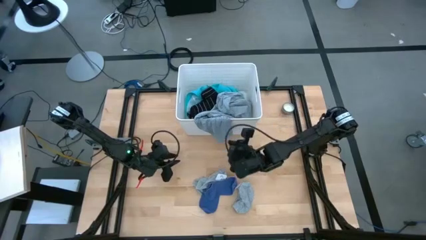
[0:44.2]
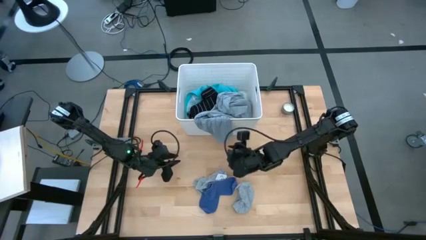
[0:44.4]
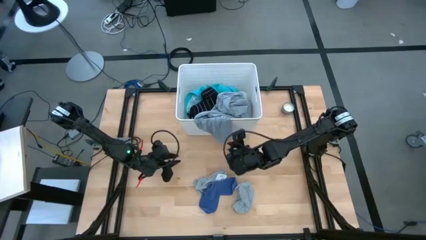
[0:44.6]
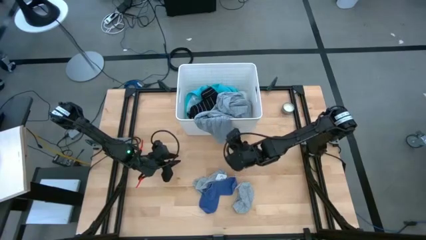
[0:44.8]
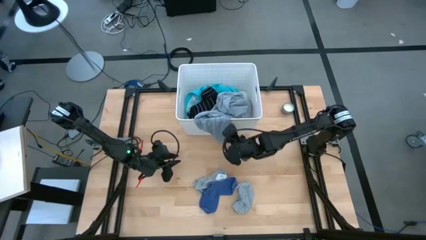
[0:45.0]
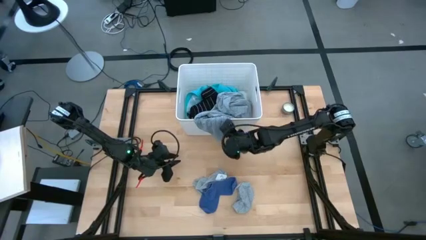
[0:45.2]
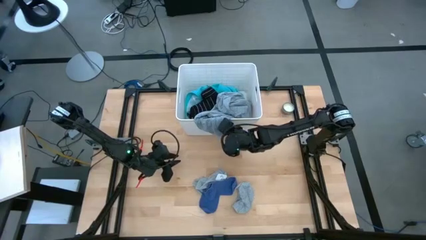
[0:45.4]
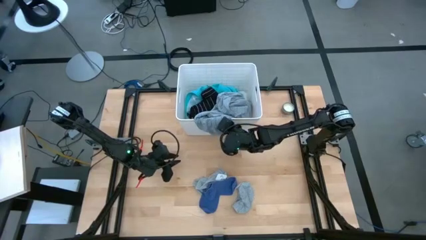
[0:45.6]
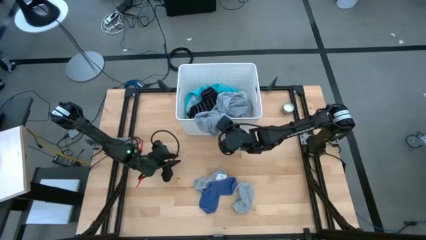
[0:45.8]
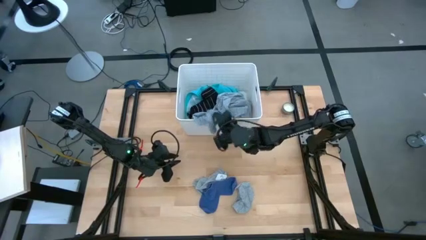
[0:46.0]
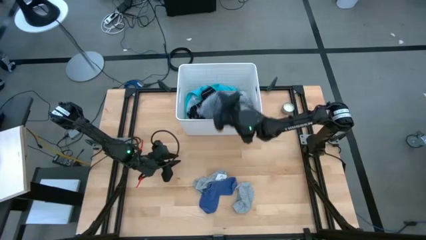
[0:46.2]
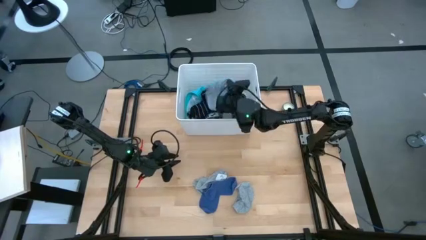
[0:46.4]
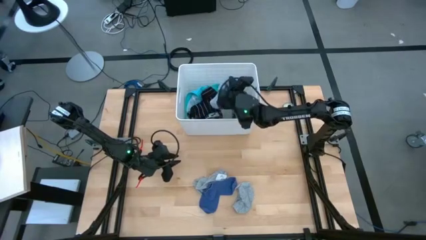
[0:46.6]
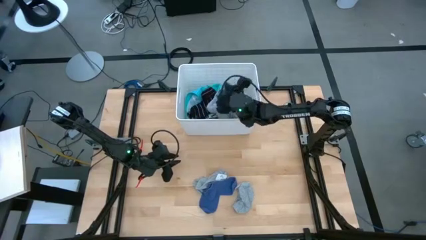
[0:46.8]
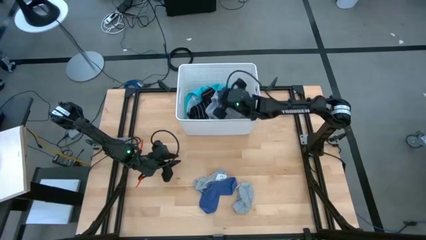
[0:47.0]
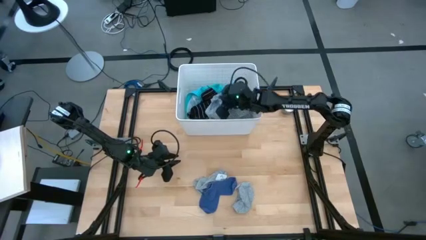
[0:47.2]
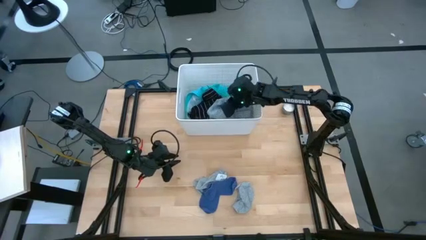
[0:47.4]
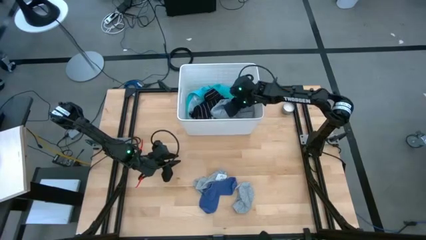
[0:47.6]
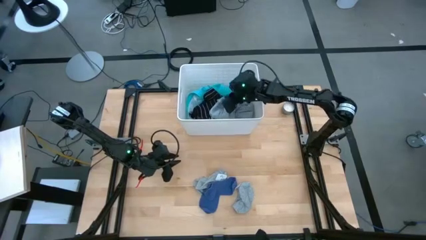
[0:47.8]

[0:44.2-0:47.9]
Task: Sort clothes
Put the gray shirt into the white laundry bin

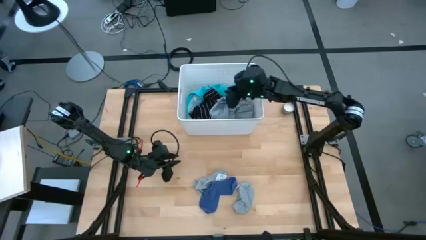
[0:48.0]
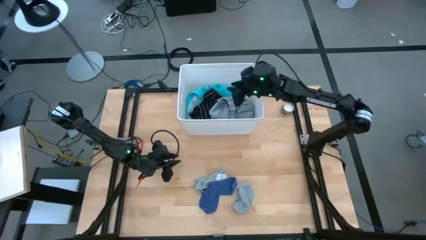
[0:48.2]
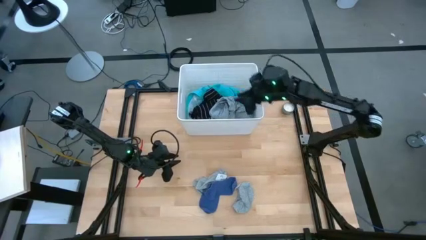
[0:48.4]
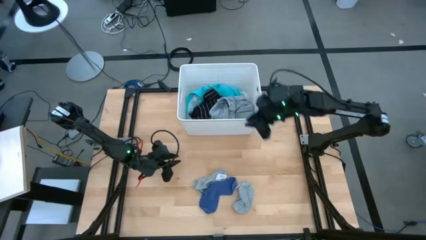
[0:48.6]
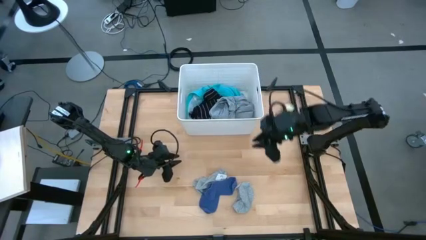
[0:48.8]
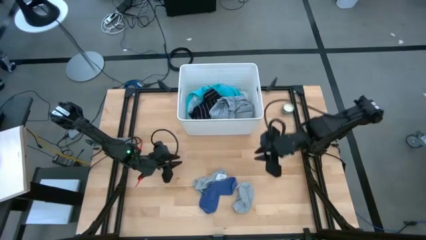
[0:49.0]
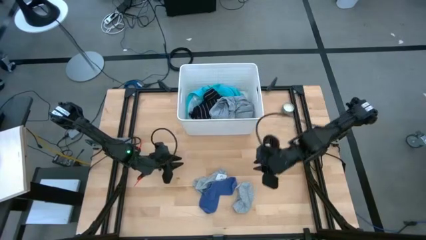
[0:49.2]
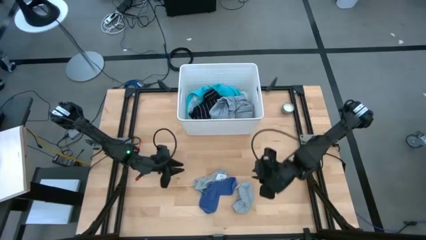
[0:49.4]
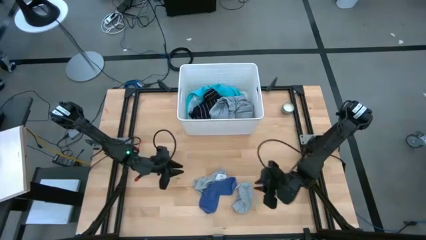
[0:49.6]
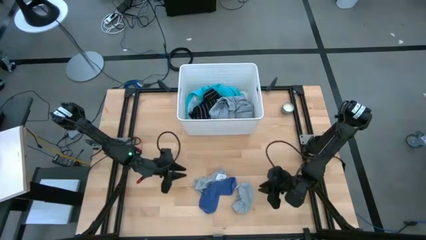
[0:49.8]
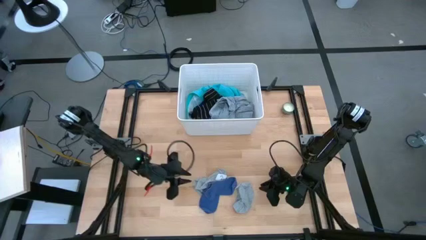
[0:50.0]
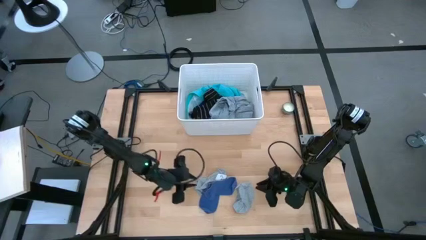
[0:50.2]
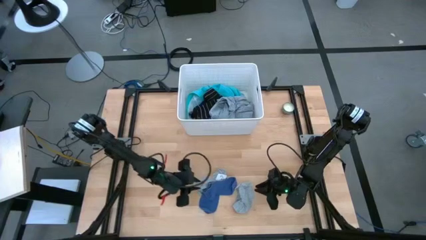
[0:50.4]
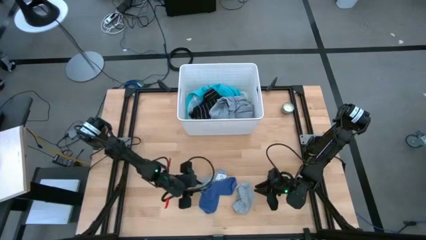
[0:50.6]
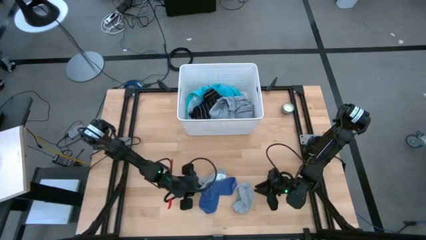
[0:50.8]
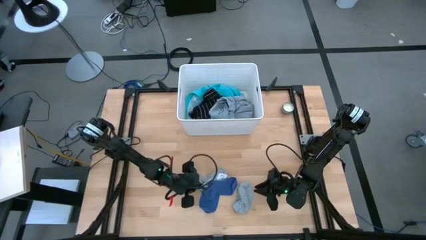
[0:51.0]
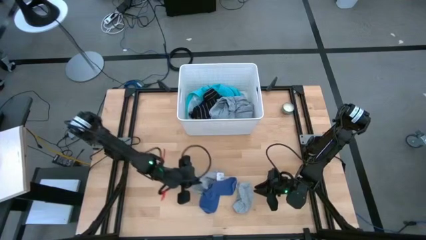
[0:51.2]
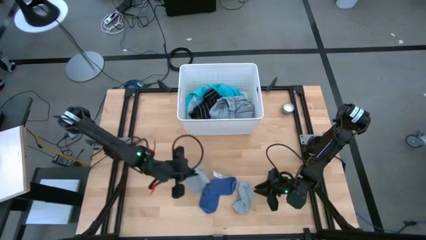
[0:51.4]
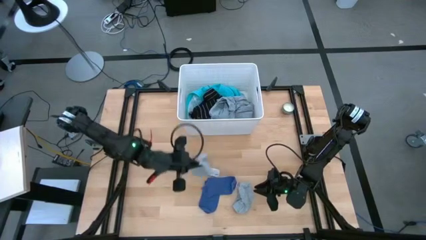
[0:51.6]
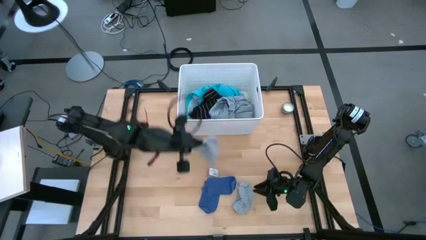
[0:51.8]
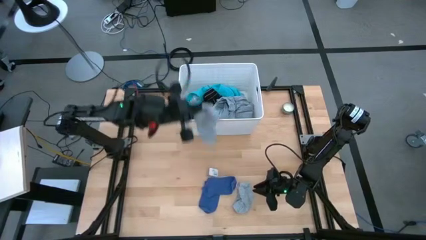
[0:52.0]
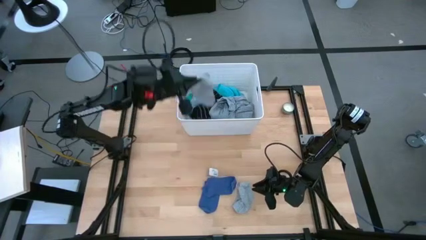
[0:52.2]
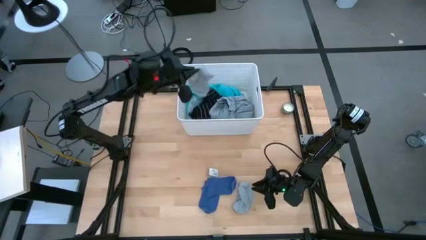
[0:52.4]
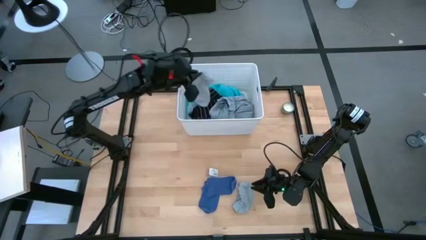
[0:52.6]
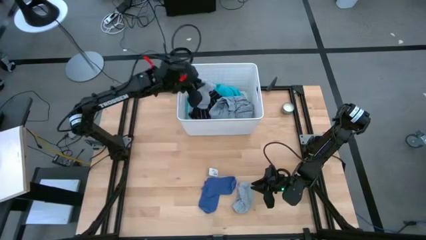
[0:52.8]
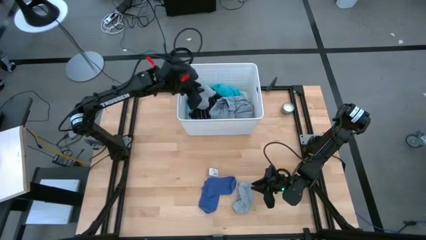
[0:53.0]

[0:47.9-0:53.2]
Put the gray sock into the white laundry bin

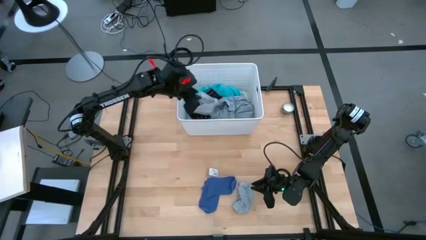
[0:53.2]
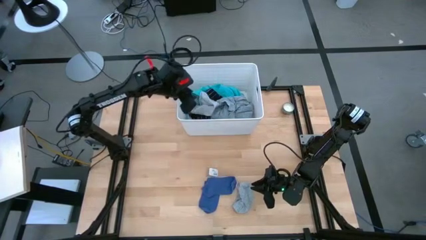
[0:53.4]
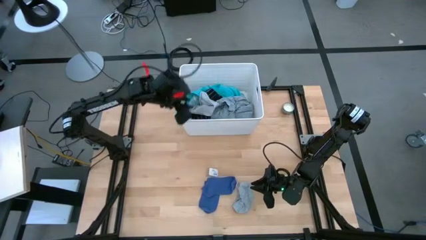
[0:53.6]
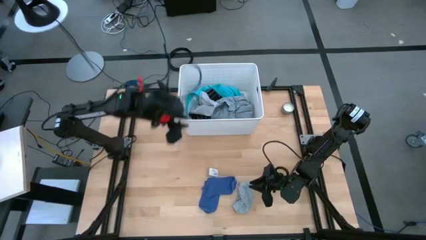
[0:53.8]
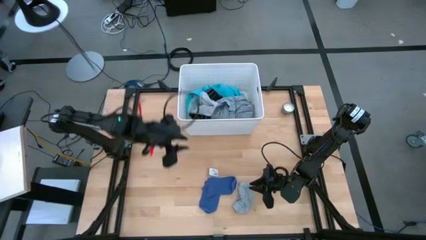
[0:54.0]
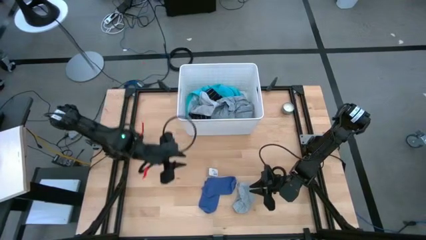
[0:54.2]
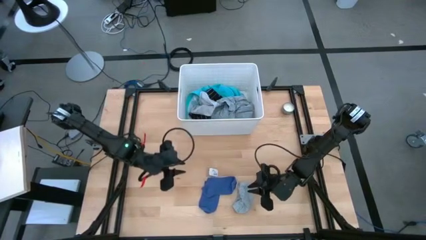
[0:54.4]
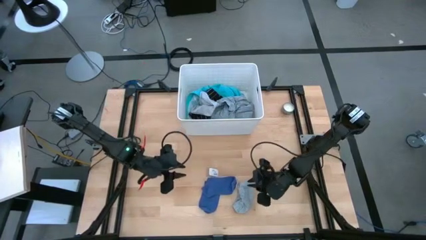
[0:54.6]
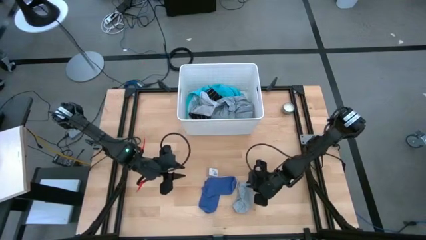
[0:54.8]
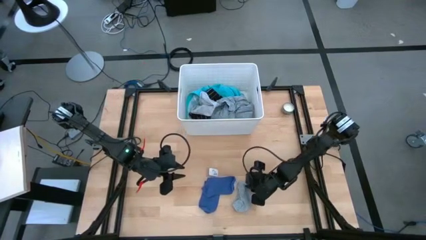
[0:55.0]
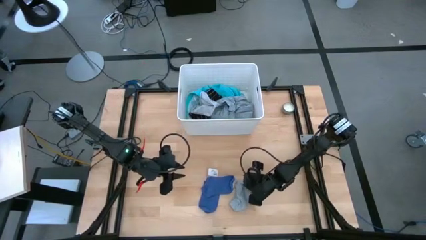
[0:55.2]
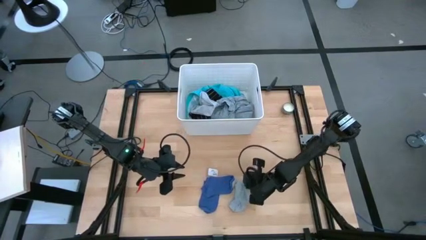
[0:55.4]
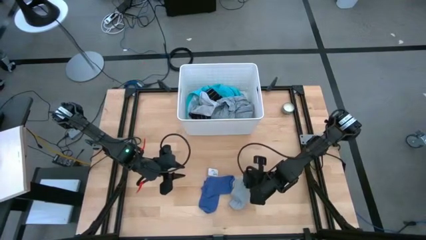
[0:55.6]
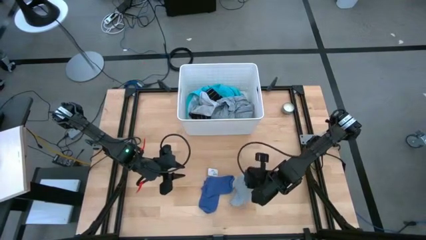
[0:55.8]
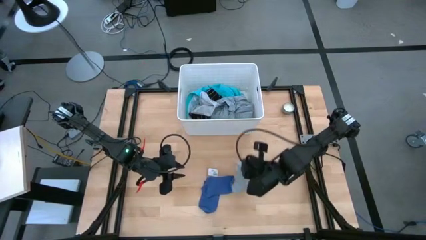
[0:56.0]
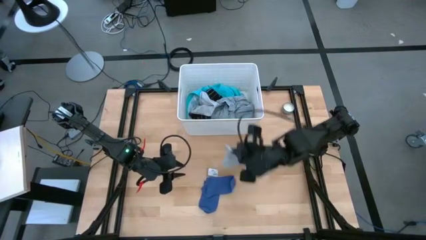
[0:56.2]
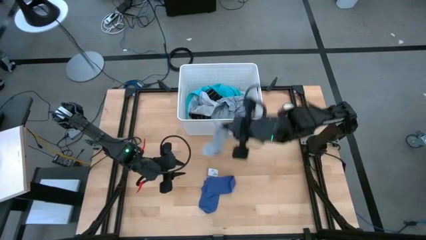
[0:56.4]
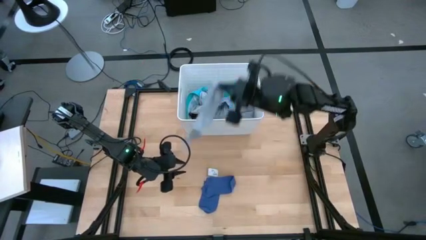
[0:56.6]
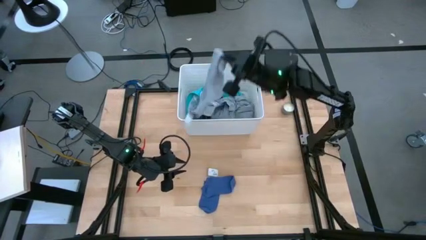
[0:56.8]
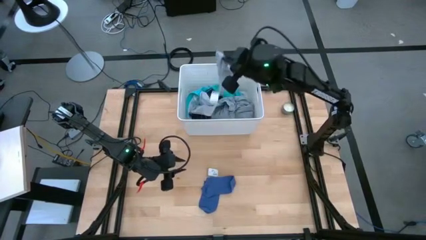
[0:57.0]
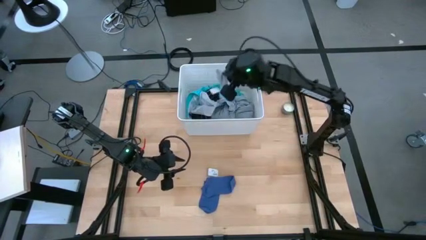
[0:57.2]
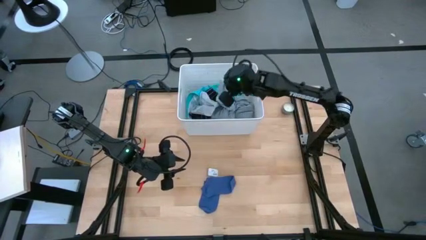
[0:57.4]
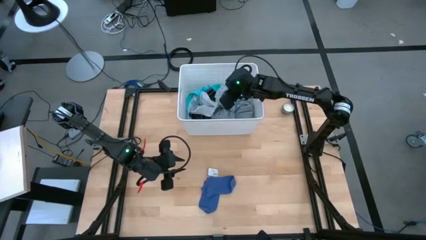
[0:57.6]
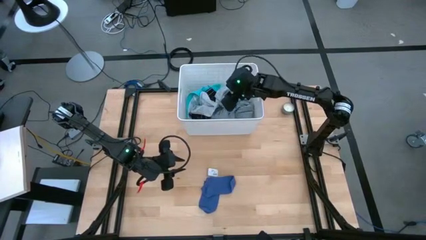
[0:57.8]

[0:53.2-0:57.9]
Put the gray sock into the white laundry bin

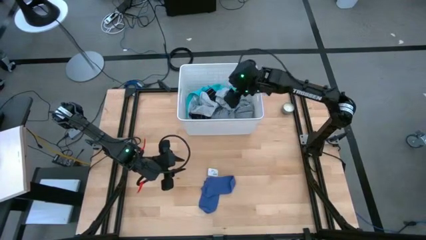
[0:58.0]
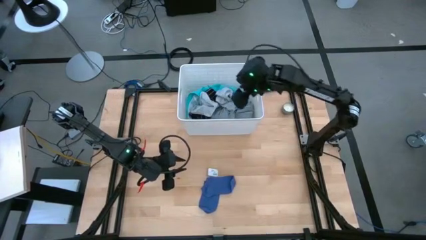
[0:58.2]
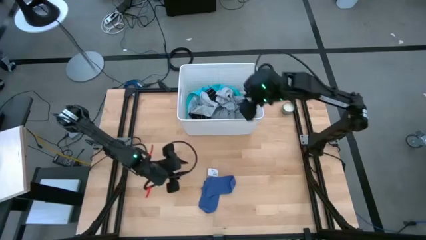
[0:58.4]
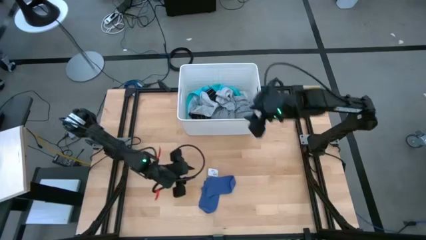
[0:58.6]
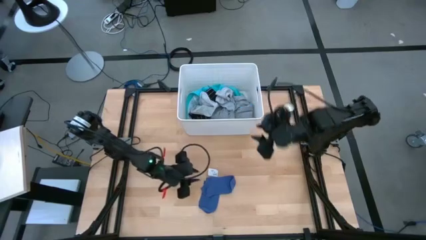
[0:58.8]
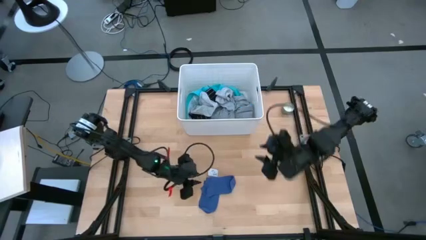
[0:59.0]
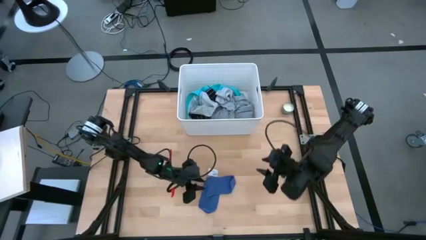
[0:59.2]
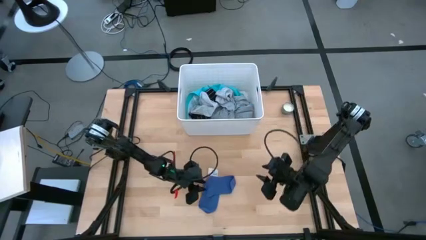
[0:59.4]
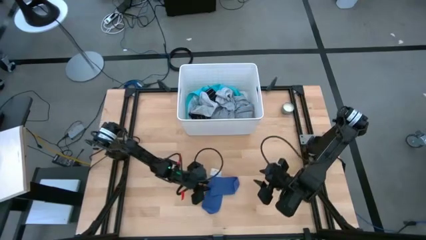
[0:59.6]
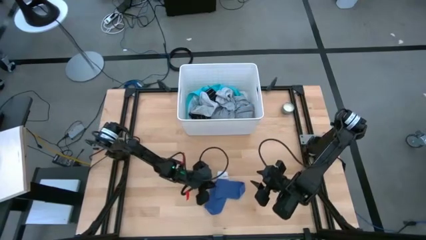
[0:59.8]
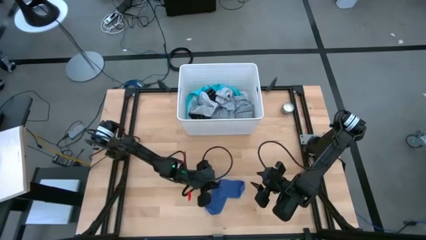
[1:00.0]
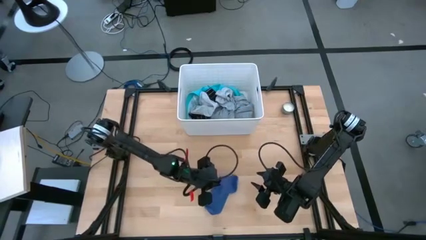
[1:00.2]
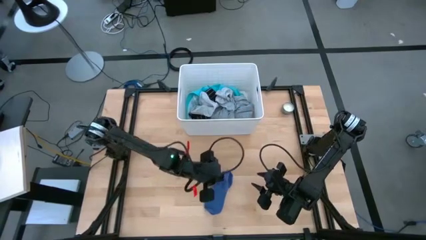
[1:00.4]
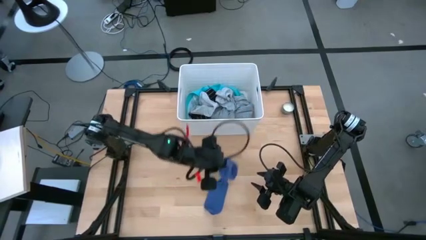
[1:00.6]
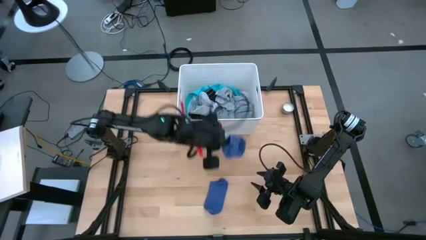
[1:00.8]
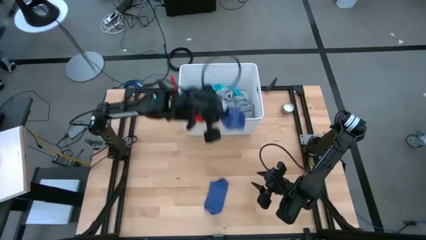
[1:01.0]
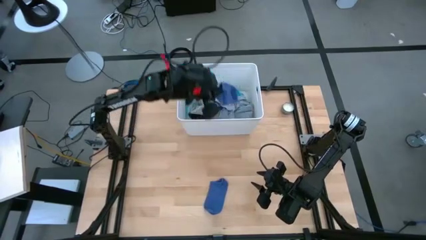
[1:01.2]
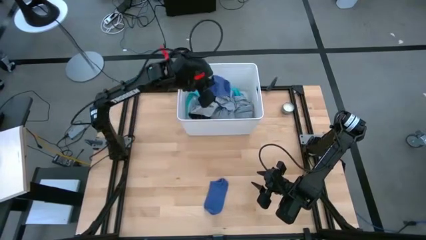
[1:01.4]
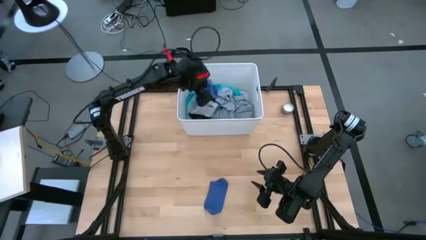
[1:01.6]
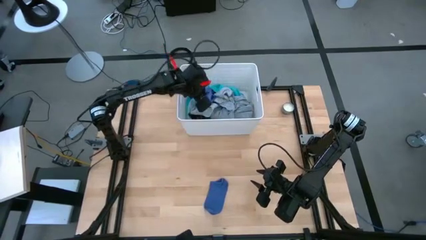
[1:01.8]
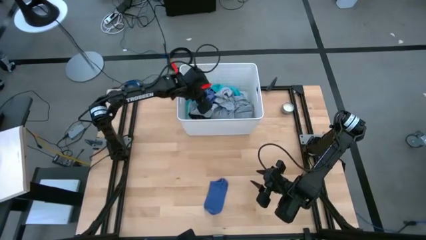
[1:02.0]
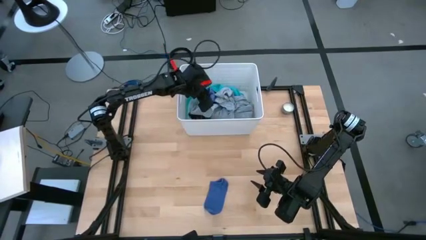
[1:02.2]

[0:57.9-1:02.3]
Put the blue sock into the white laundry bin
